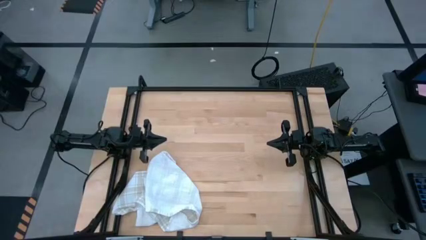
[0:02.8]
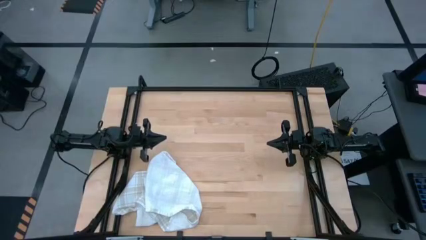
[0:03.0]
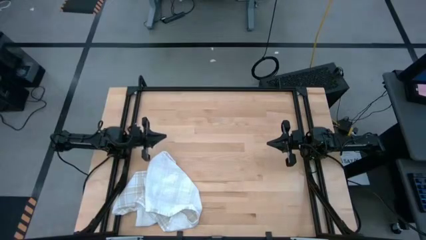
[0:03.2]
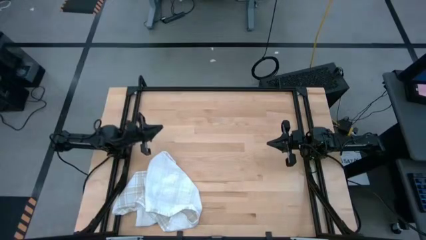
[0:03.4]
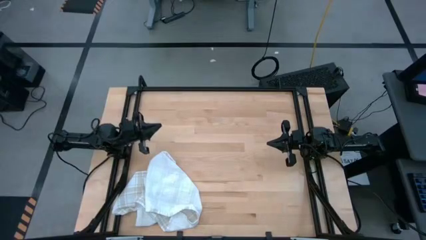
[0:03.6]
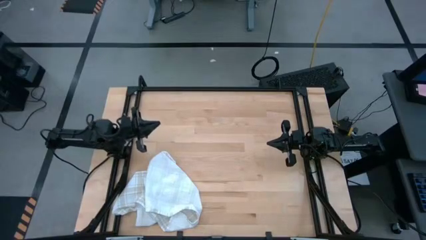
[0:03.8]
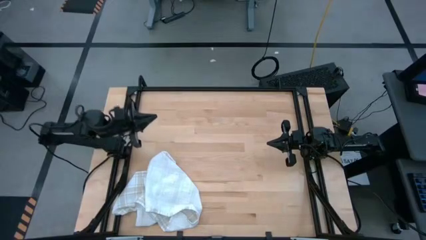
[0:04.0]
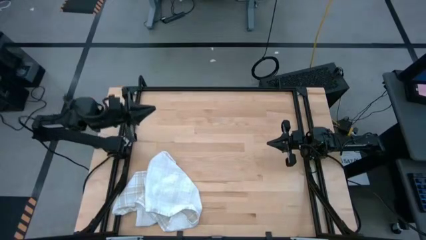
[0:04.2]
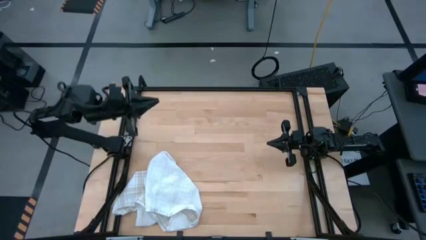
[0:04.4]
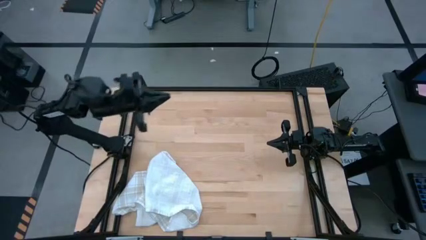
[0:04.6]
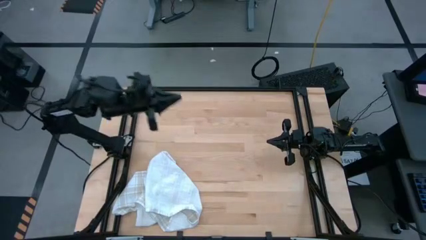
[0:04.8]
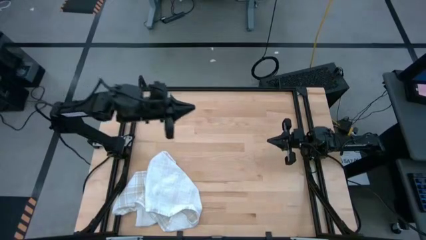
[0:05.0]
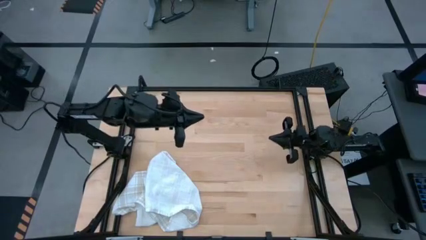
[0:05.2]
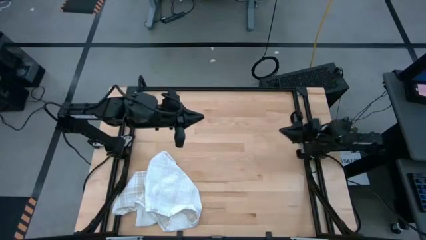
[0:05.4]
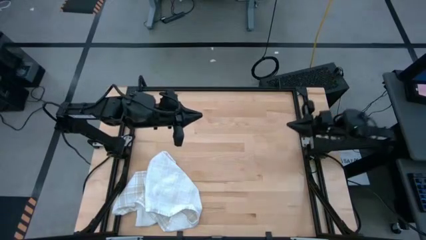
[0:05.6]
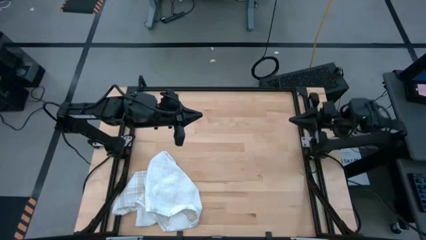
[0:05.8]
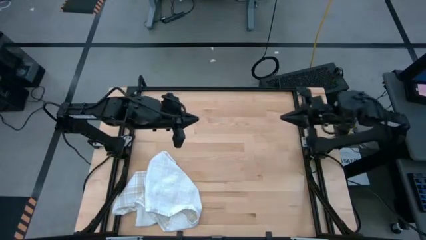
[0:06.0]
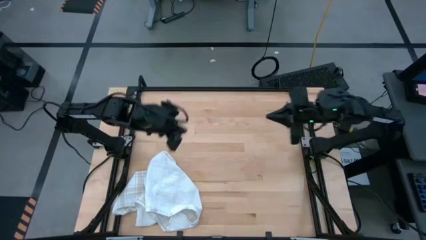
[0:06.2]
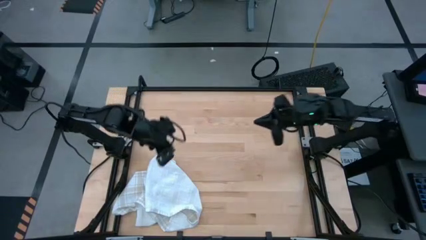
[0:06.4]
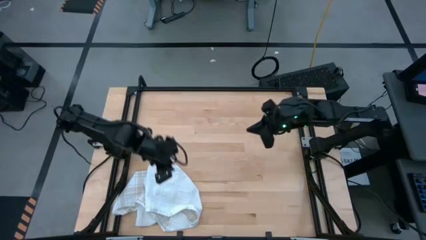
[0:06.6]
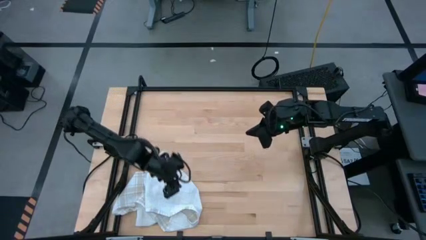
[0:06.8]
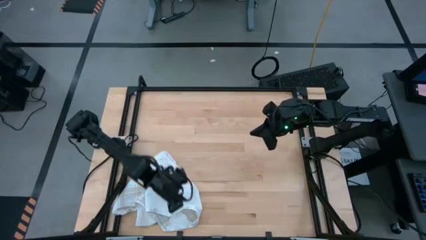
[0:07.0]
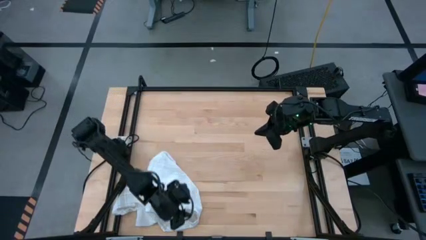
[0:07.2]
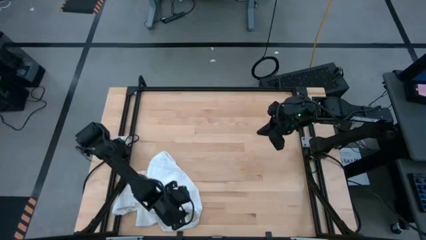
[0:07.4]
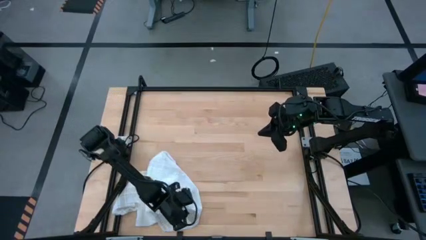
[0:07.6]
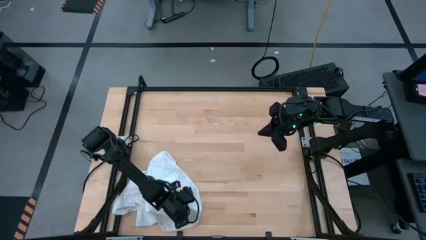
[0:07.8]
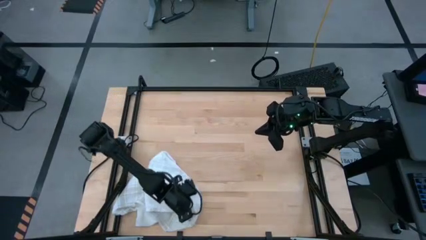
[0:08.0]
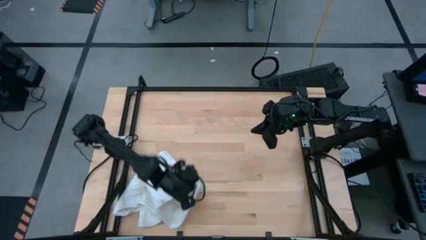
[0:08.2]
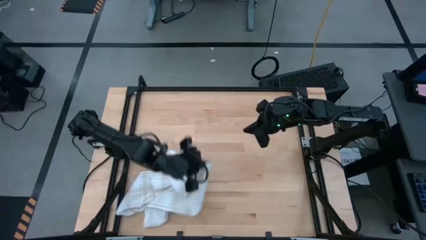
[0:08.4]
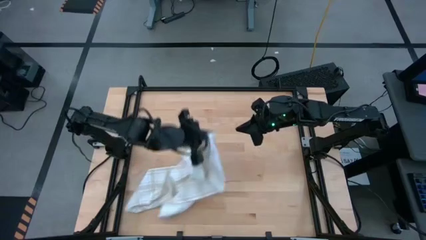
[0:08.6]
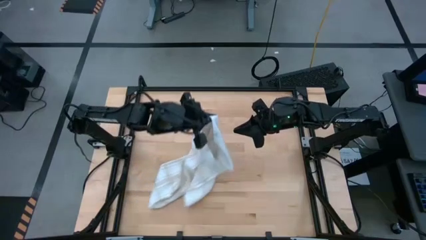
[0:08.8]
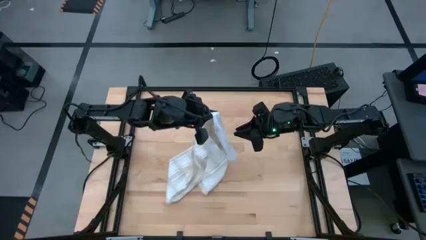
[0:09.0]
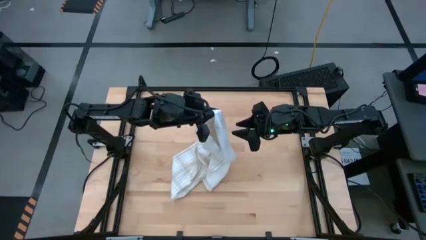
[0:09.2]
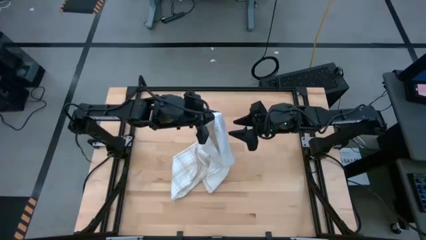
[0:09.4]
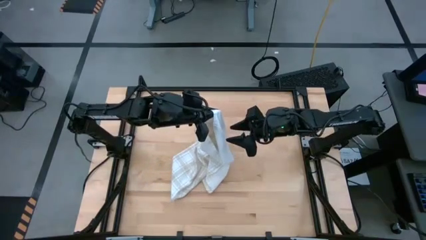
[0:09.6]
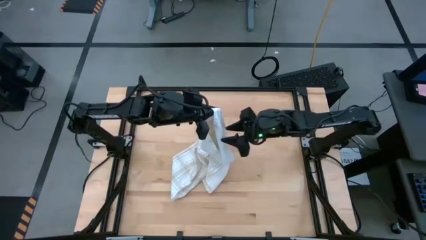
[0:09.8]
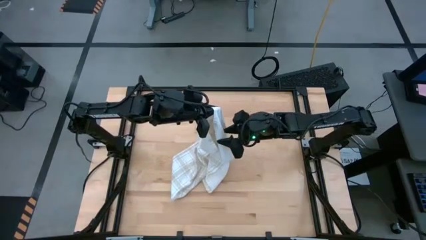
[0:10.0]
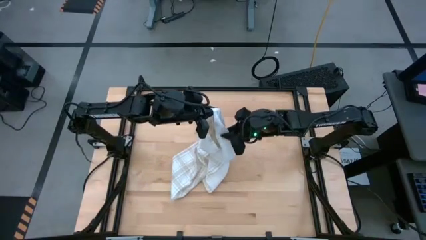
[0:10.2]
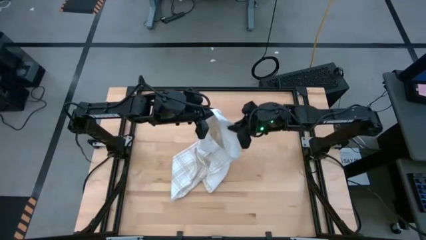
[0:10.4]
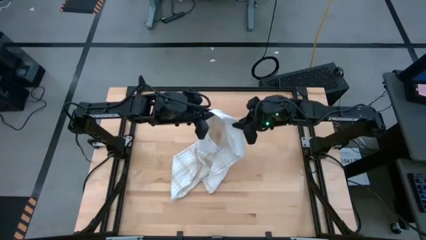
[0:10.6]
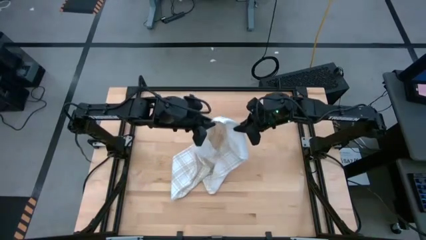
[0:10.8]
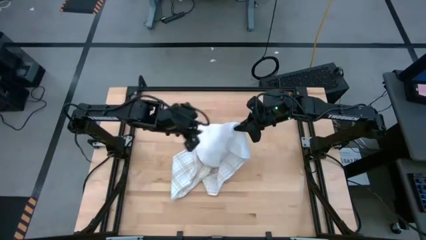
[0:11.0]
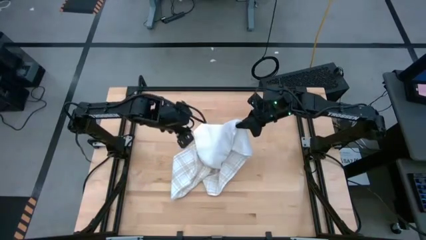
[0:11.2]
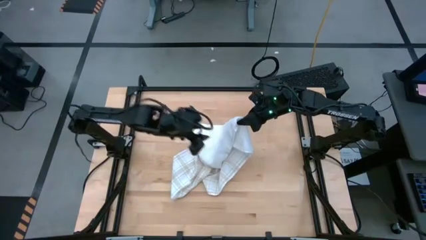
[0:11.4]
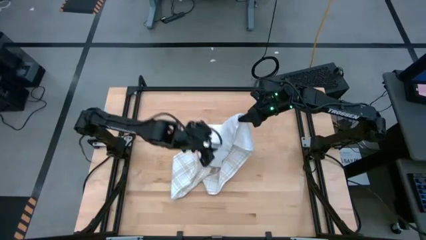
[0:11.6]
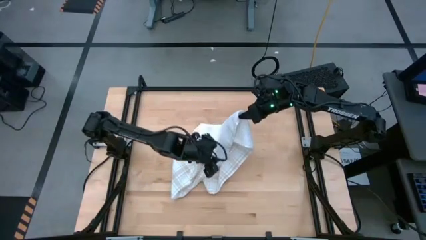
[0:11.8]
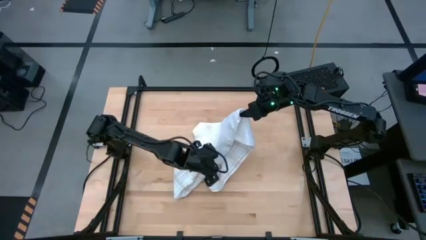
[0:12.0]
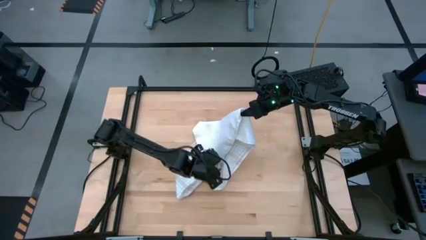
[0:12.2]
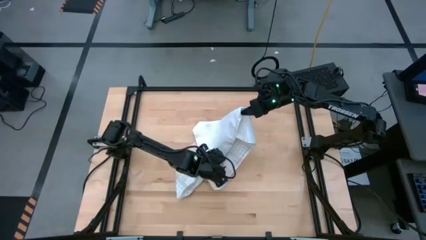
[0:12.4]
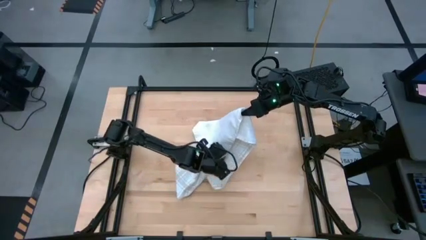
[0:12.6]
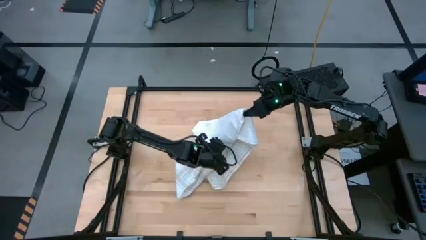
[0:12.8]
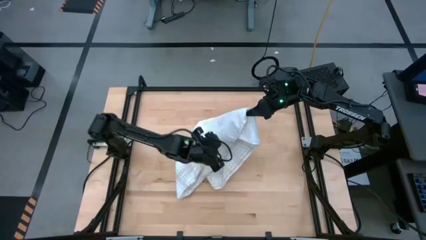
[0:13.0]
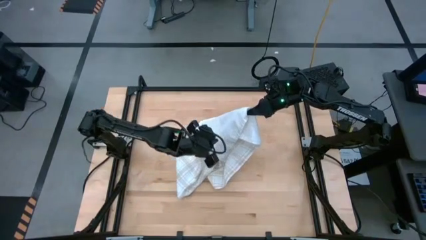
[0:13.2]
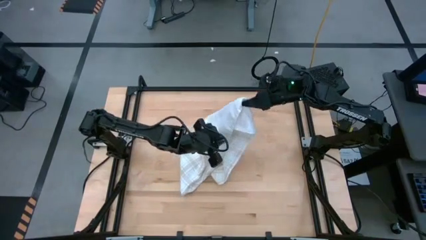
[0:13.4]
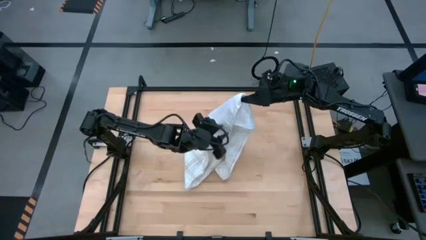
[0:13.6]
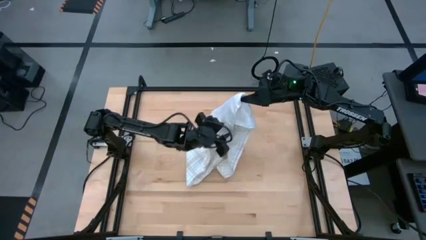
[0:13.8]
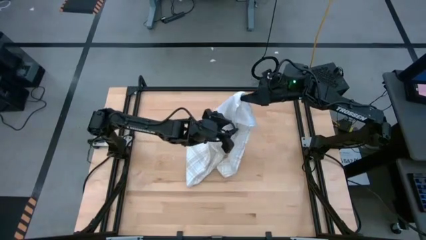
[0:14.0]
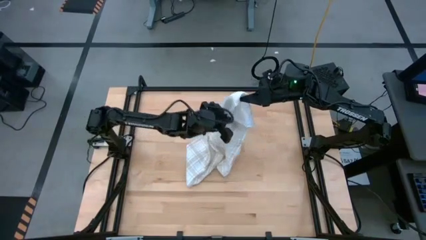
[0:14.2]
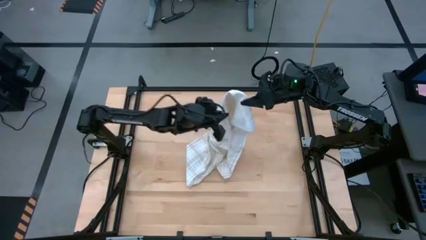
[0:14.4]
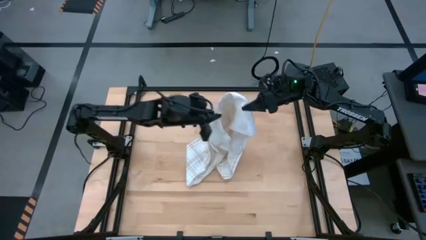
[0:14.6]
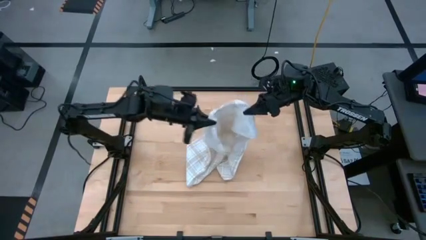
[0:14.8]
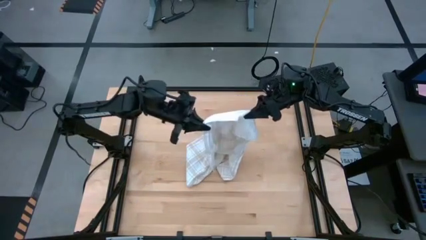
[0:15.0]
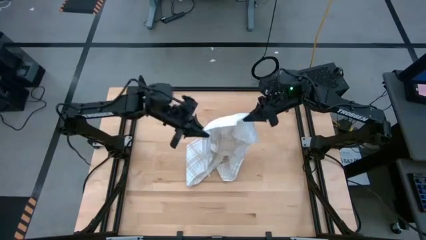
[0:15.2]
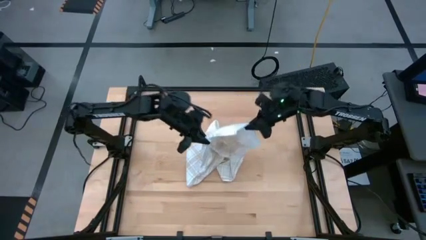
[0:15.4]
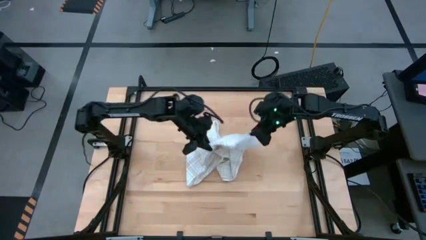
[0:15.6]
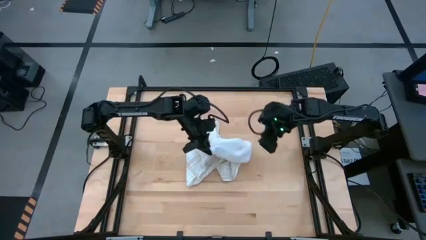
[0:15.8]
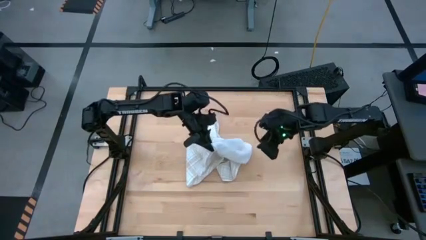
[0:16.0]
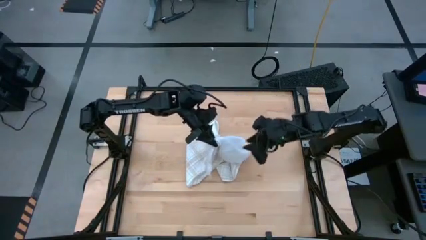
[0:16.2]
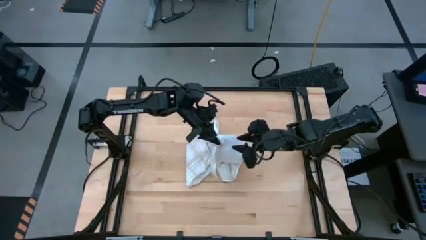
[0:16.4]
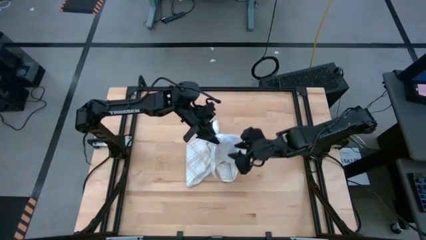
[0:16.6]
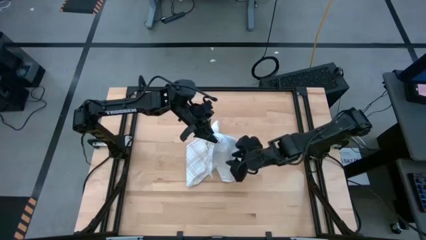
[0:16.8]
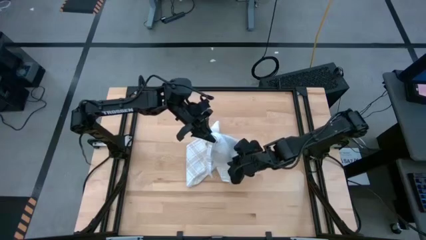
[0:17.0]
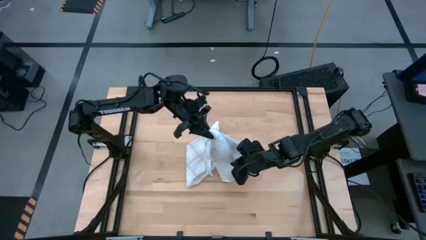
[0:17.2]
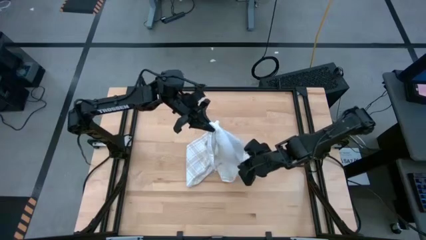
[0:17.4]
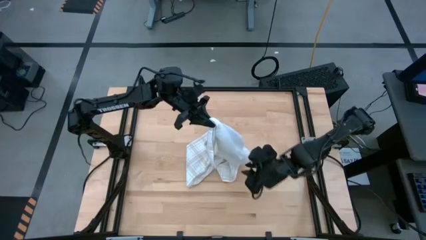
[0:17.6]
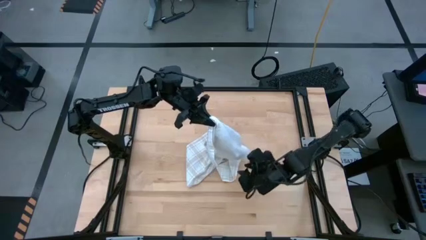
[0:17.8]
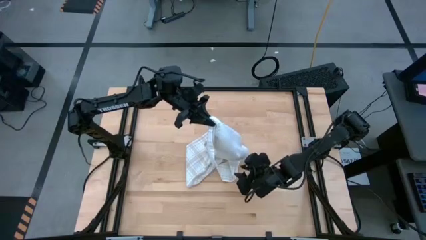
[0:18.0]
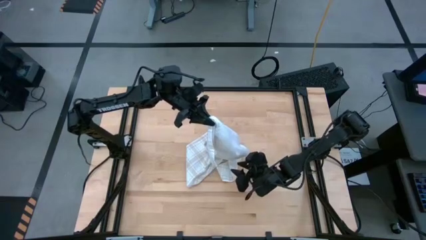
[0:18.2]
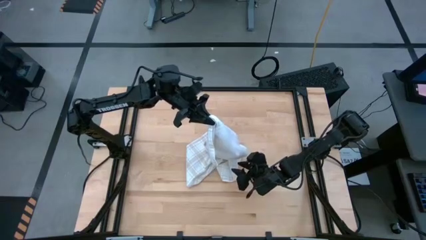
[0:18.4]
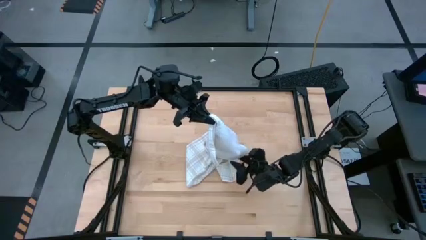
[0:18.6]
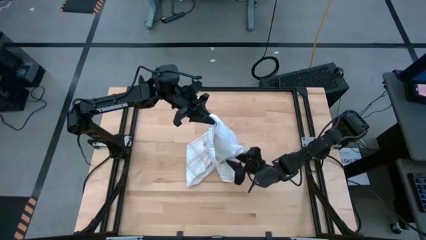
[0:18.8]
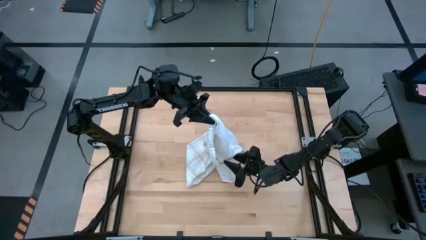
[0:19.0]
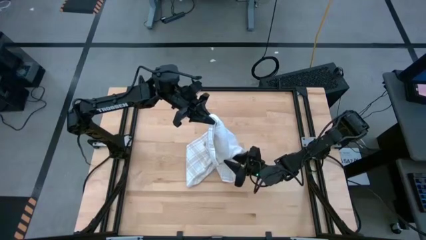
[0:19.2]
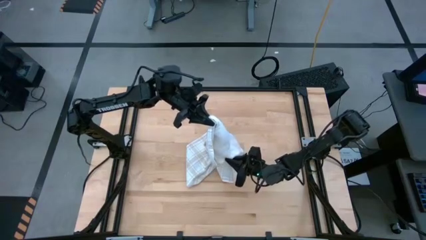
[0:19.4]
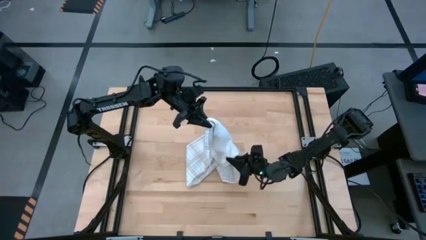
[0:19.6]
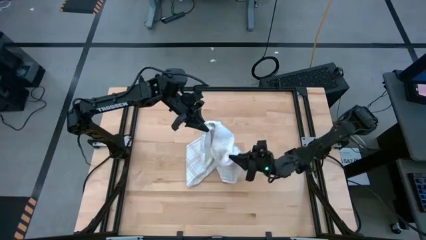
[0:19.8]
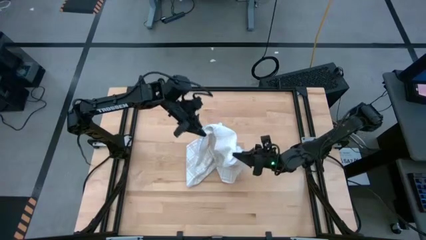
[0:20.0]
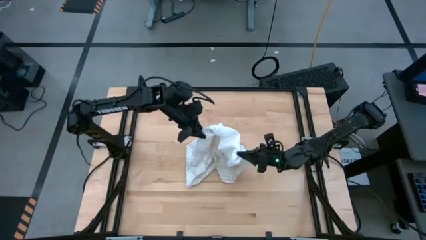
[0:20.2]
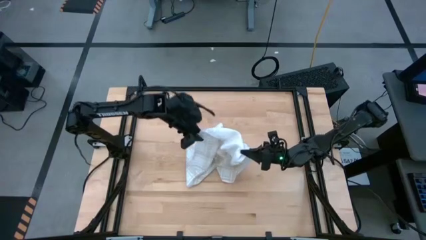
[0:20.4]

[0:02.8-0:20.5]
Task: Roll towel
Roll the towel
